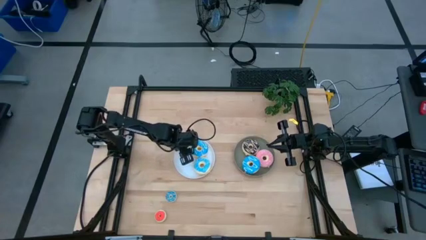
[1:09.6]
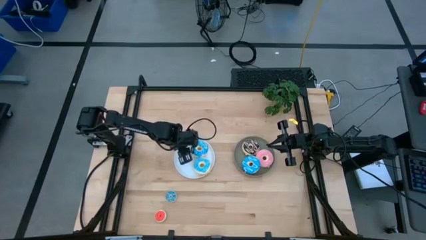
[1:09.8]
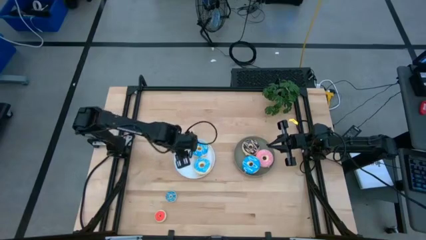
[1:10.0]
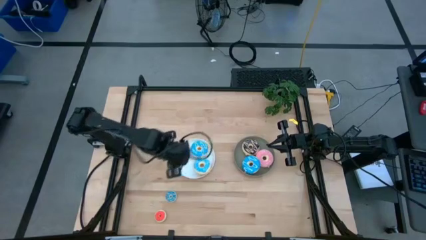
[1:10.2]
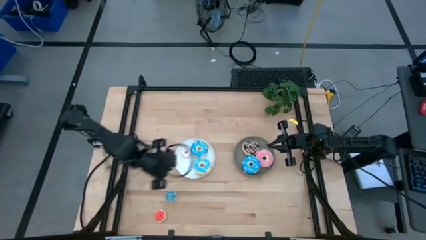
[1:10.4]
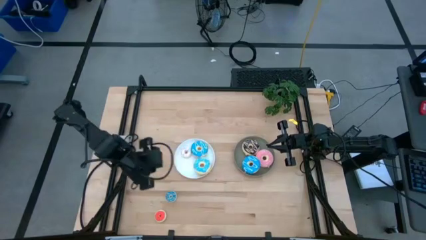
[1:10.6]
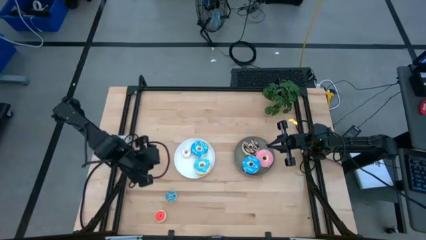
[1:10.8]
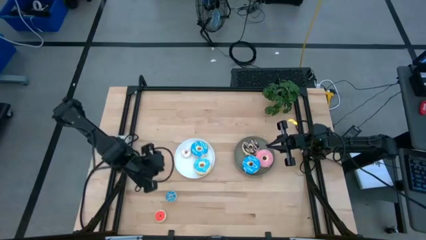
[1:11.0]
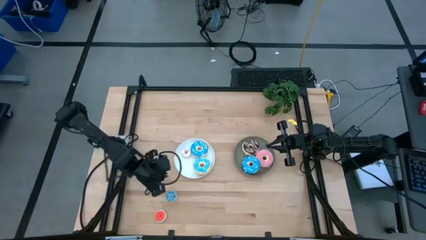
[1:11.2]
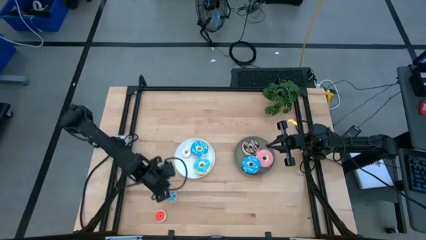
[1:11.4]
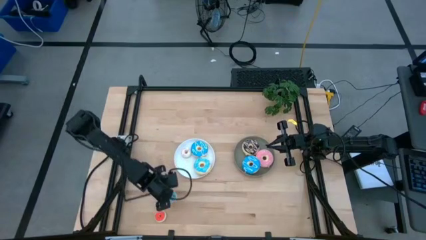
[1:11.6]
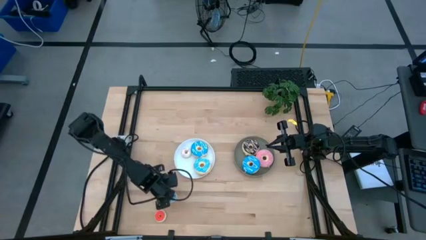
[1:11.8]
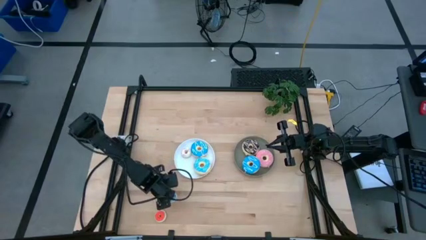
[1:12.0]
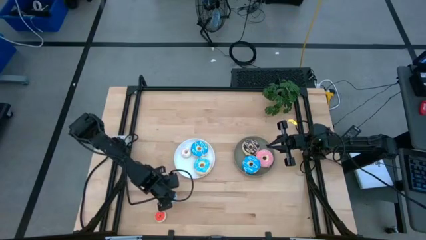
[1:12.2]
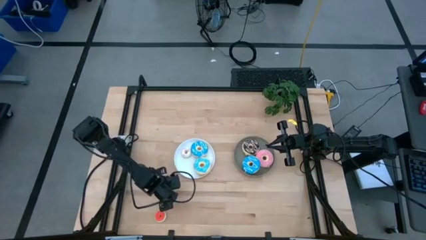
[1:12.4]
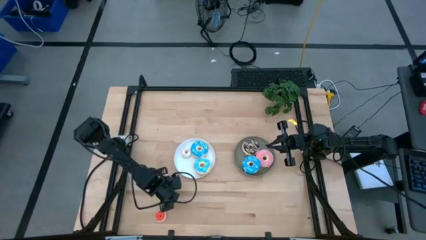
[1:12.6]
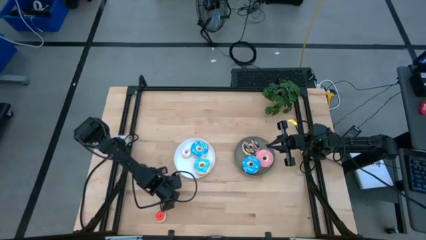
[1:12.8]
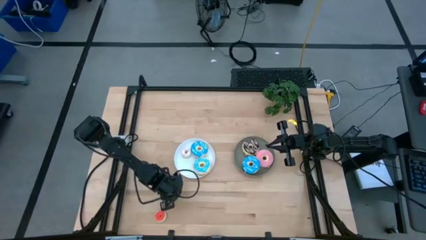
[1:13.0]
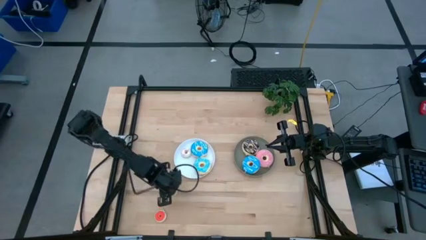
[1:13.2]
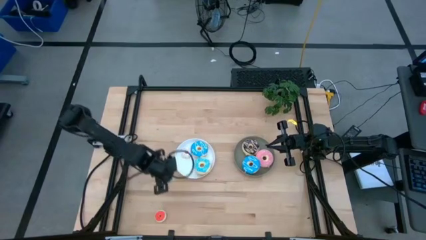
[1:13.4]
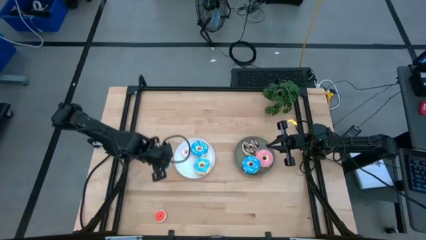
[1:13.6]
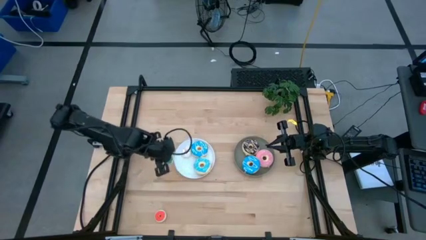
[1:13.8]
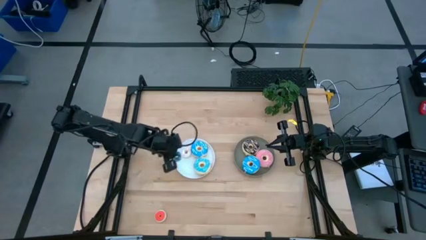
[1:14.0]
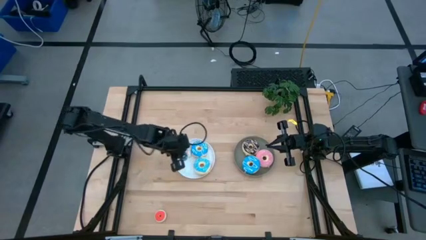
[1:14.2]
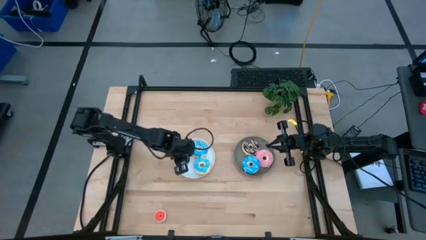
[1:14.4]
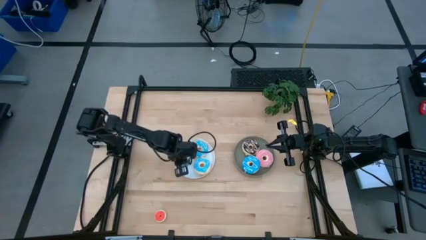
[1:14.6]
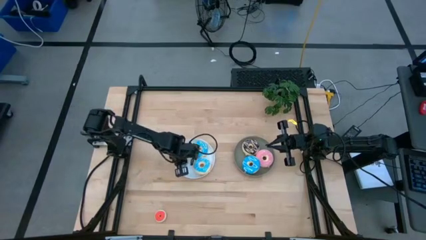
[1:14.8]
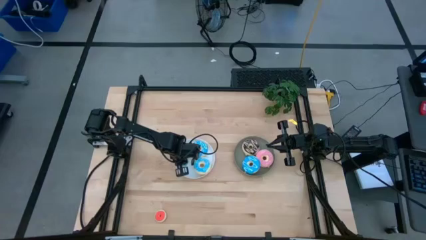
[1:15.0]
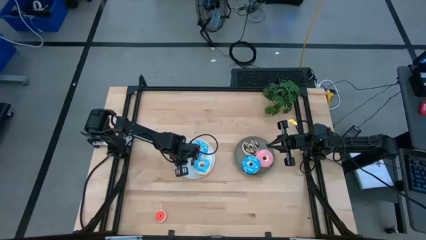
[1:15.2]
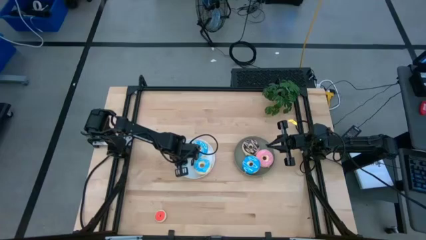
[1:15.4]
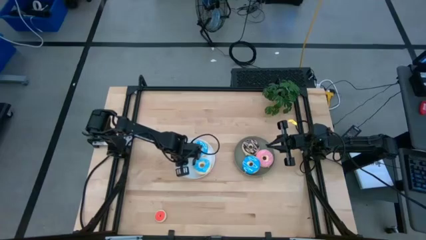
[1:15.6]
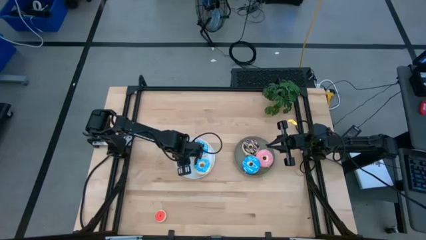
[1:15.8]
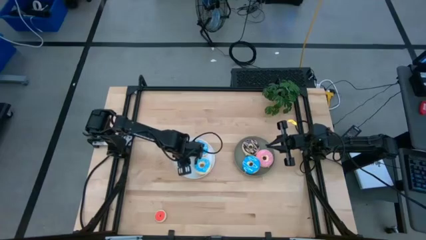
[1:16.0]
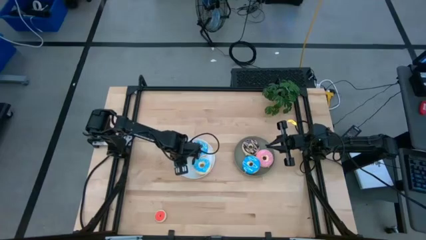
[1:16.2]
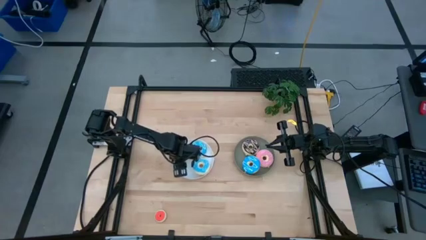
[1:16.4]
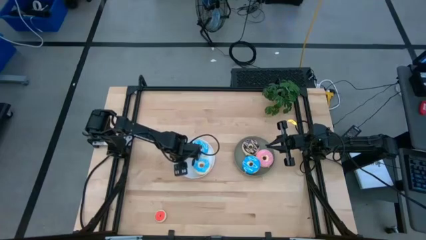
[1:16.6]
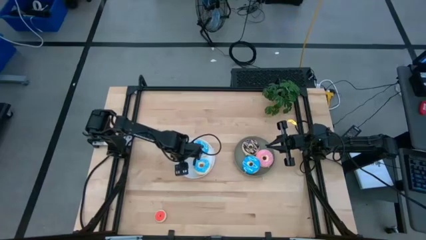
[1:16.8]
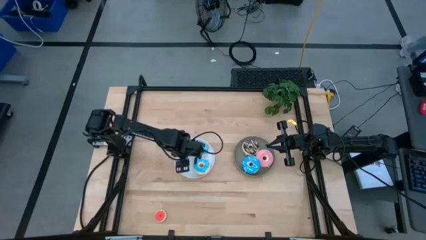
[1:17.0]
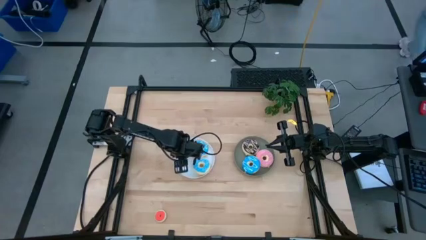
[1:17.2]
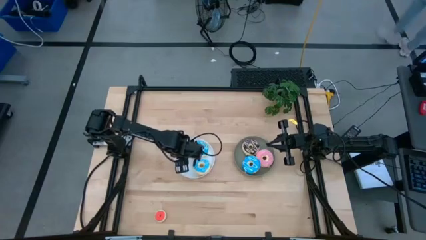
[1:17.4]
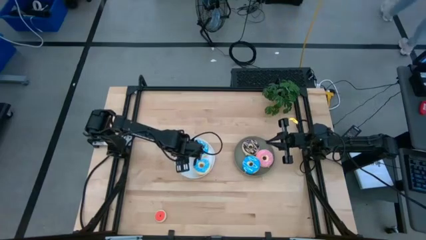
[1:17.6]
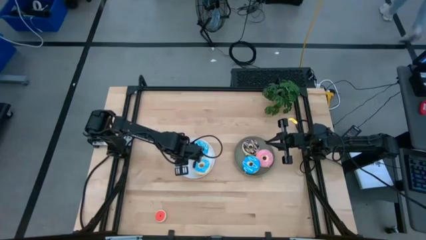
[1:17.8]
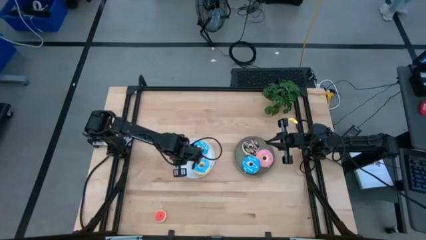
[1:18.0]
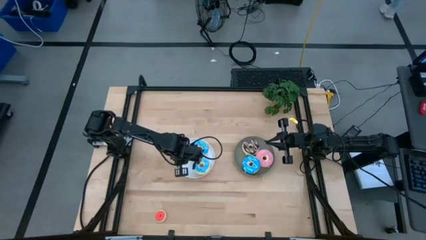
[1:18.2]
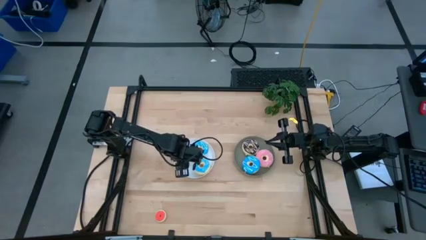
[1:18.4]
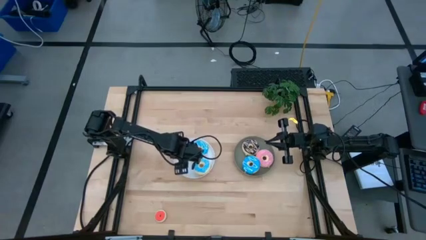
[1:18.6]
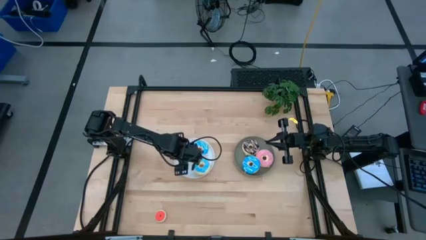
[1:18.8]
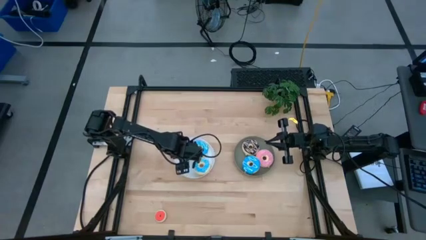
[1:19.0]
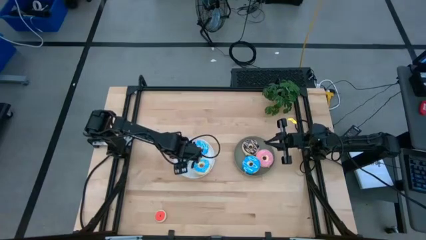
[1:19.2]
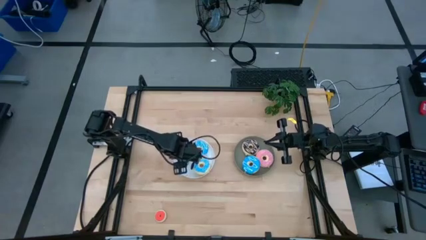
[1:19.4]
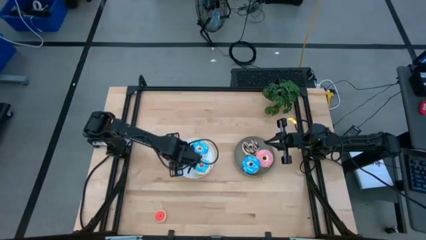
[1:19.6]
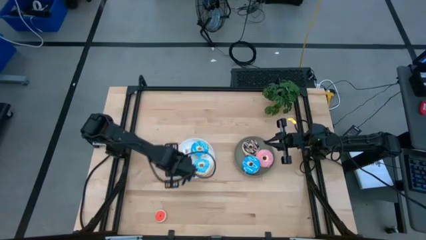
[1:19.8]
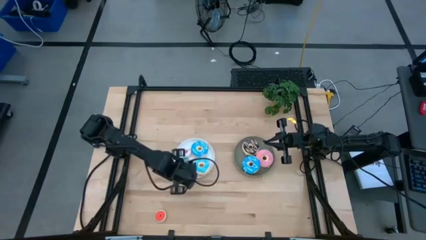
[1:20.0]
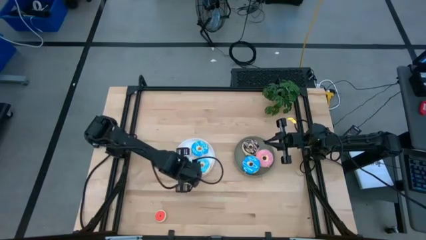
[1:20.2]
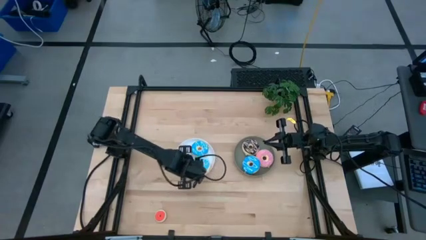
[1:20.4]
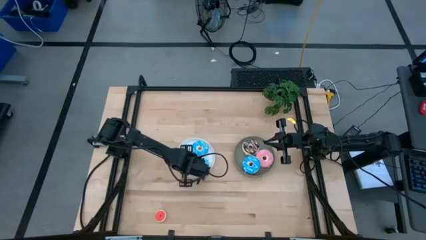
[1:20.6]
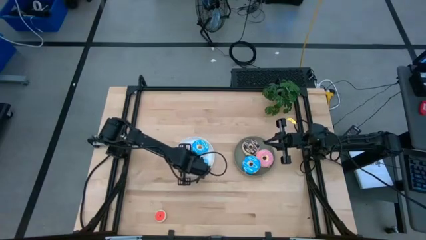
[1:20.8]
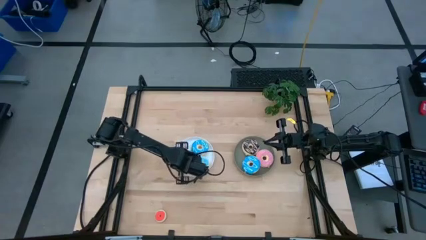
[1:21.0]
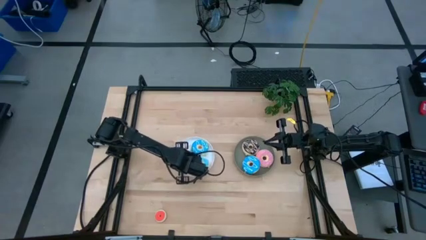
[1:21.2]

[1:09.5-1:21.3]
Task: Pick & Place donuts
Put the small blue donut on the white plate

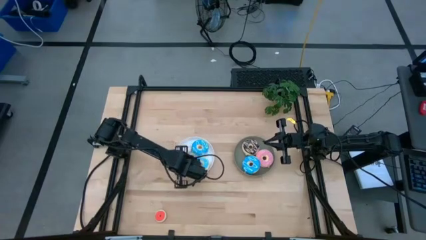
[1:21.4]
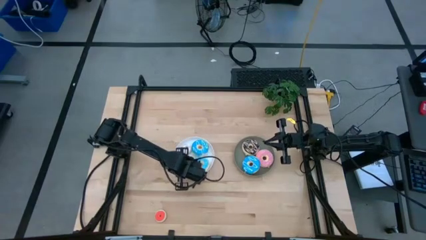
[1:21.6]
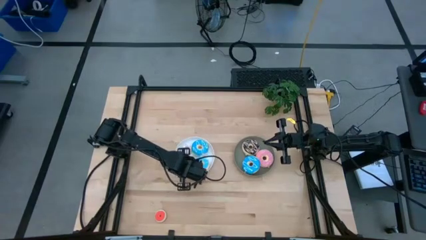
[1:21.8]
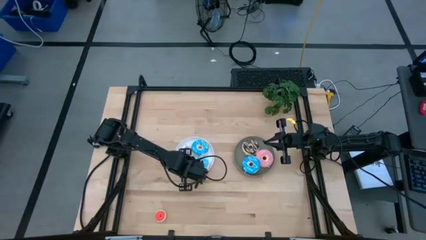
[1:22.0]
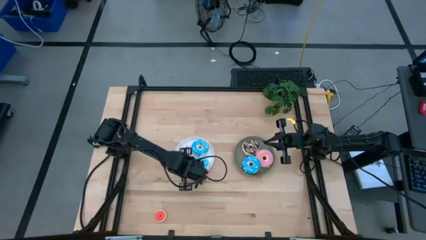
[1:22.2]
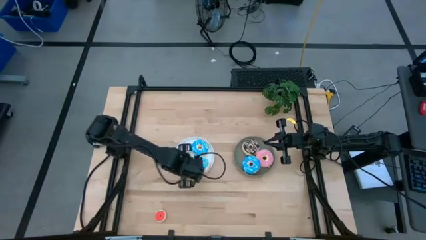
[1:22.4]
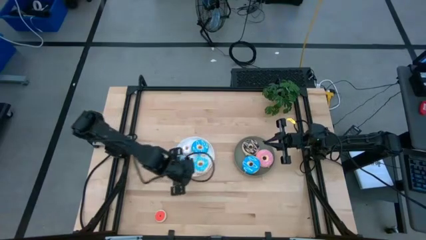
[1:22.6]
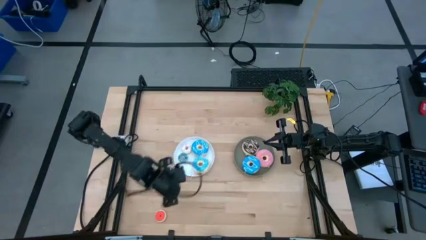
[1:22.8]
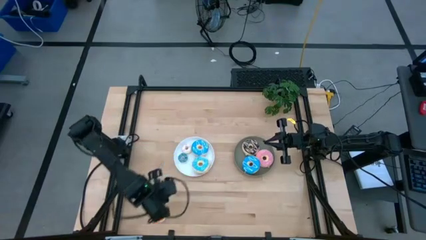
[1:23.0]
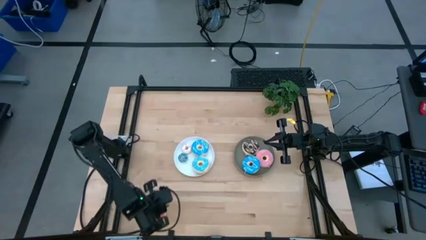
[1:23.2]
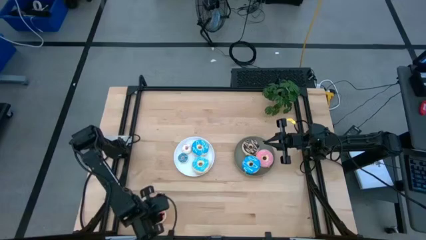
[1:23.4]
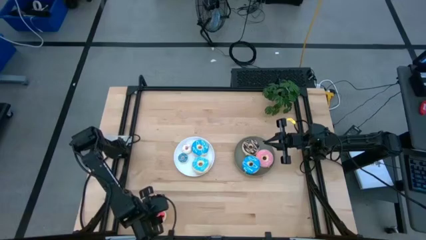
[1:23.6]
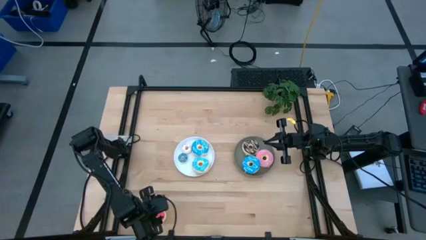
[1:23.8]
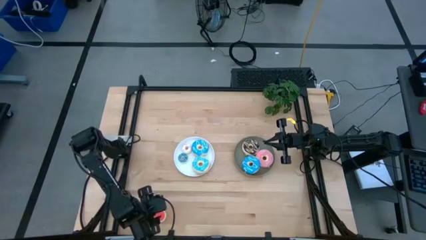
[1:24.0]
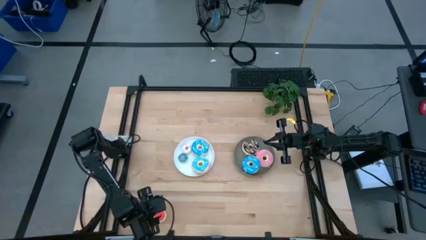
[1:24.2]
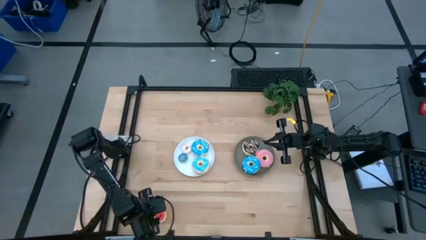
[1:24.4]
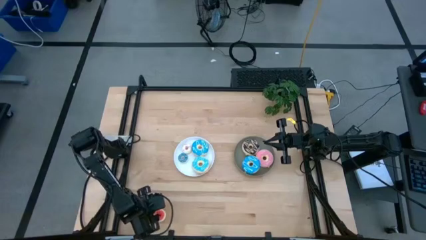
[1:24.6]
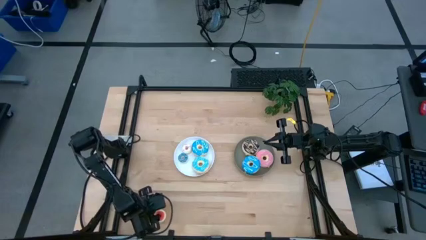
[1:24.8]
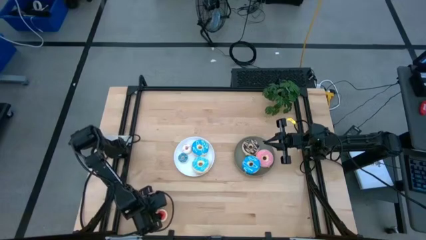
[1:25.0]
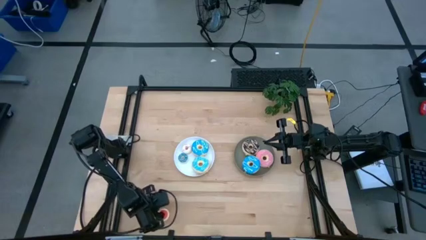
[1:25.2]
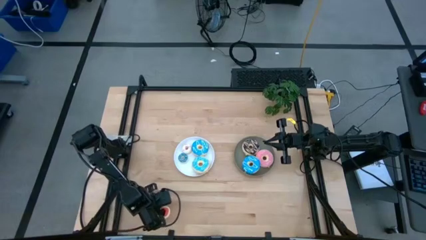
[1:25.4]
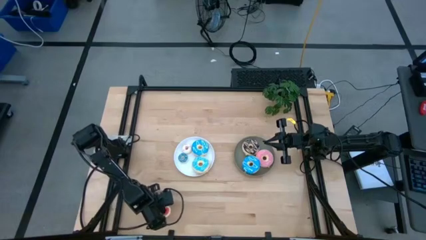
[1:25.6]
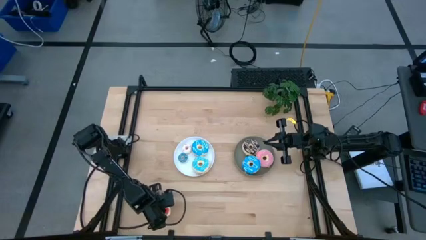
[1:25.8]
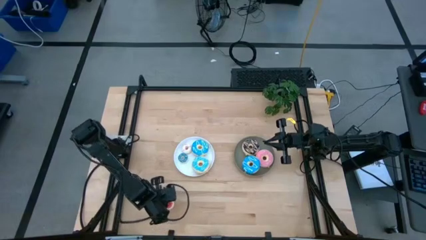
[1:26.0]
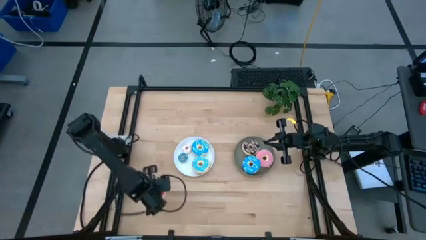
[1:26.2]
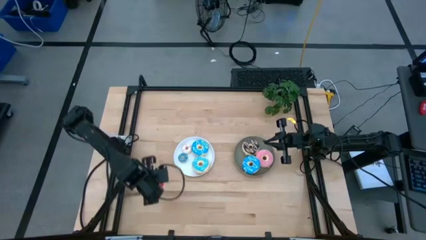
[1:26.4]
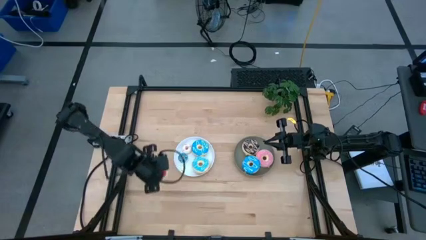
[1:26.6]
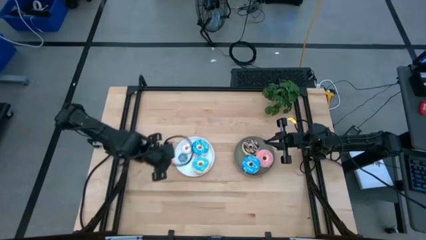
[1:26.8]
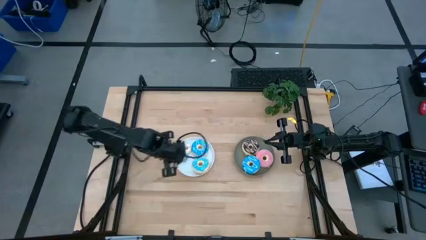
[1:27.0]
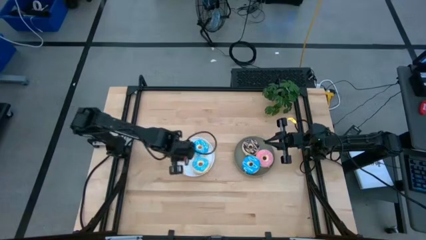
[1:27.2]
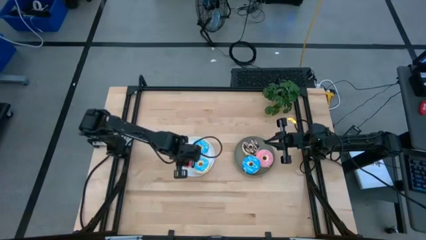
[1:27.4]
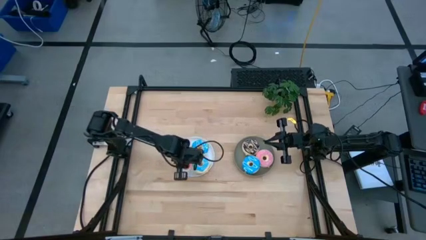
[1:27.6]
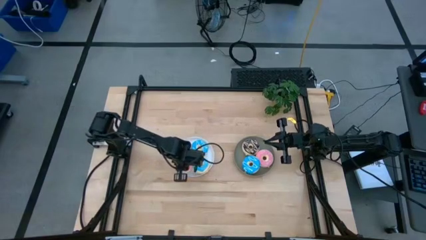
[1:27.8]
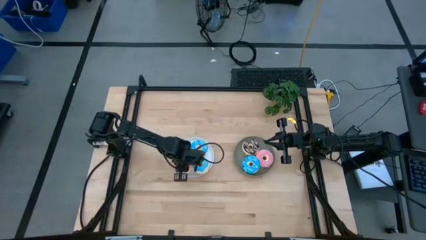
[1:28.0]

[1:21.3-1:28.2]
Put the small orange donut on the white plate
